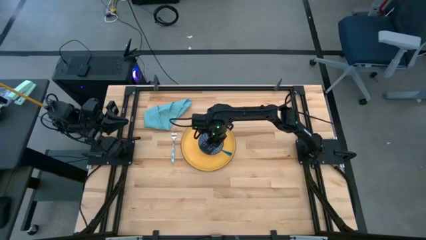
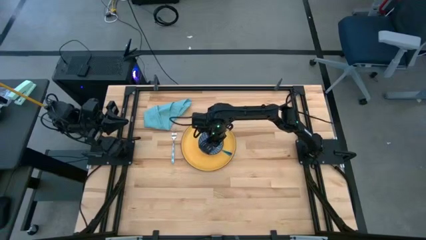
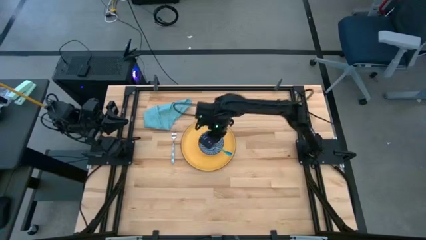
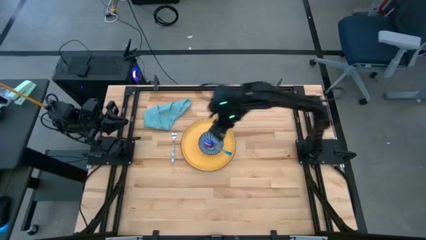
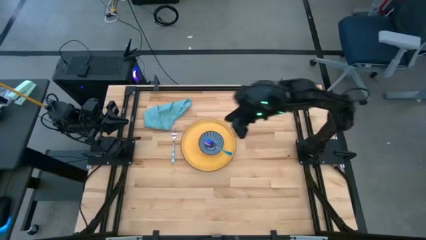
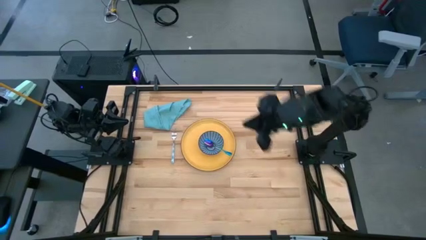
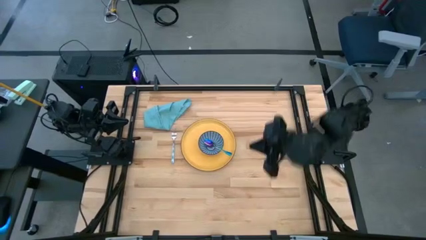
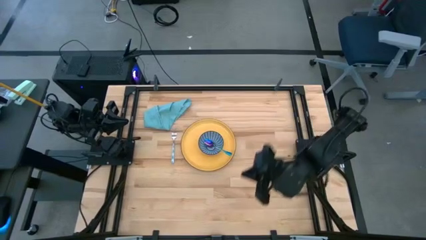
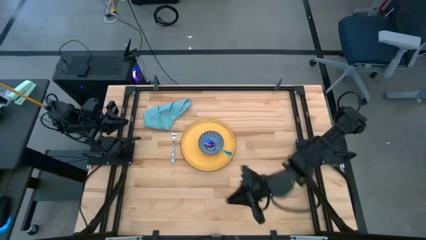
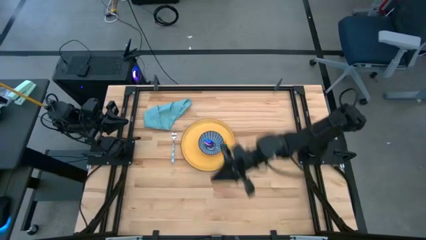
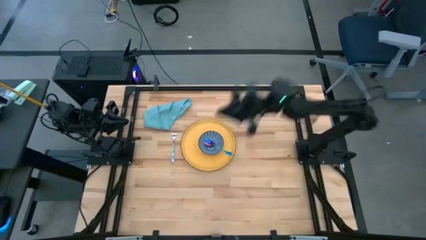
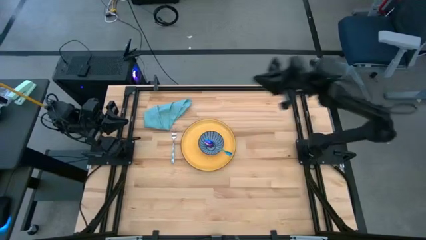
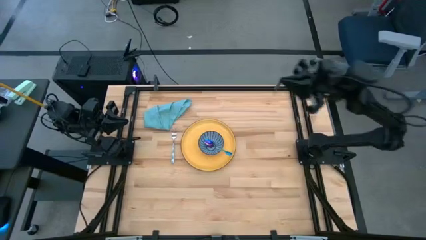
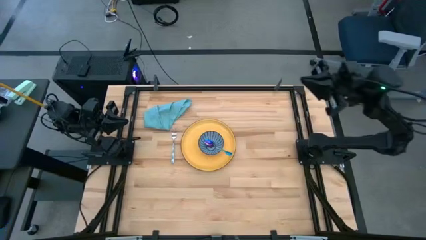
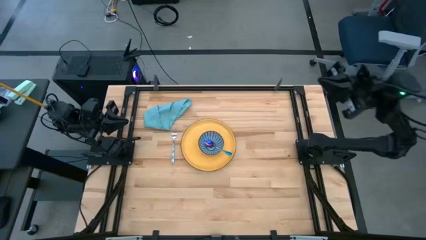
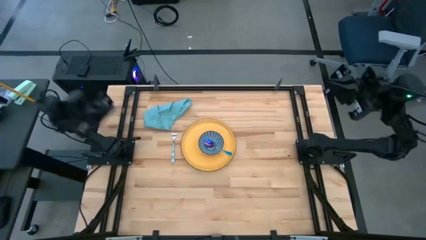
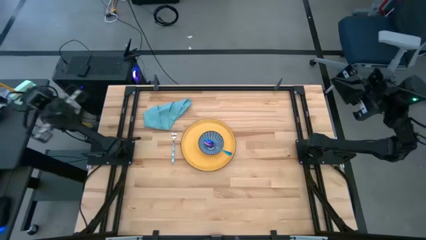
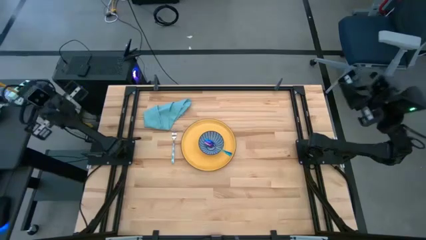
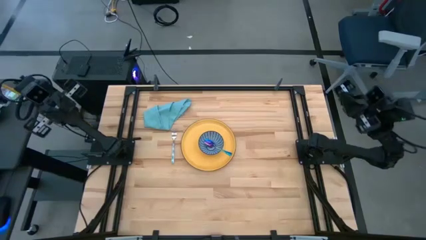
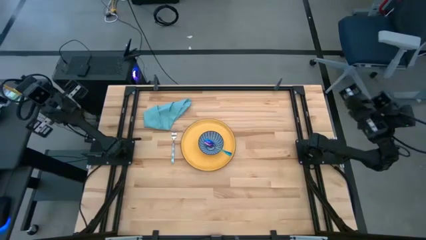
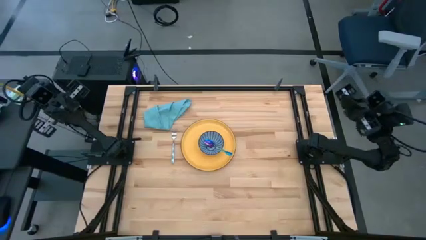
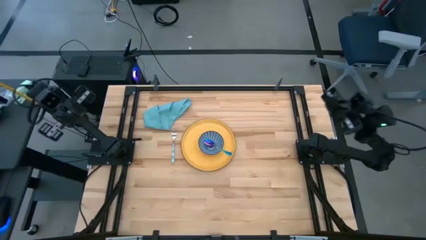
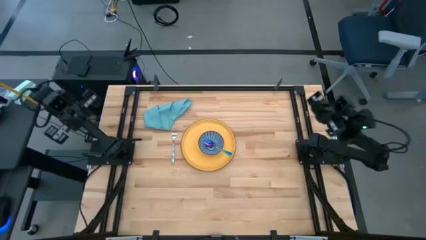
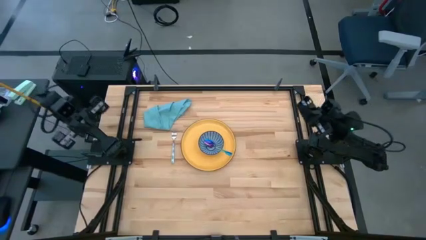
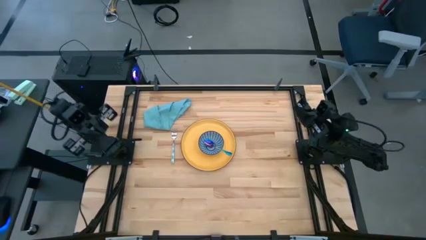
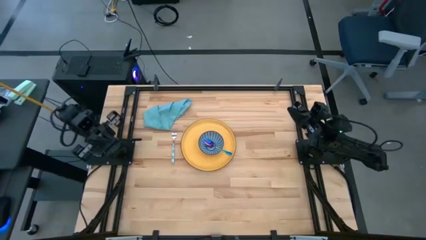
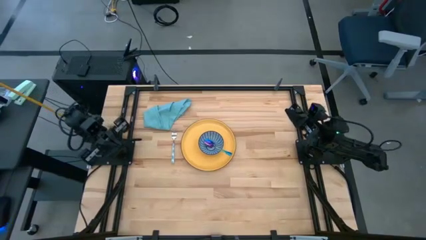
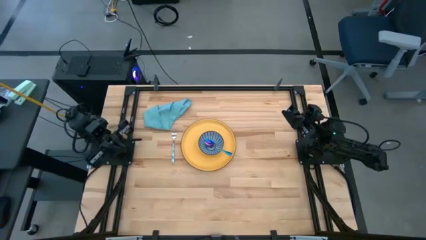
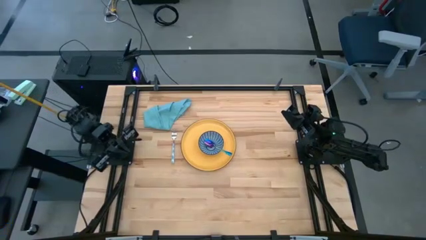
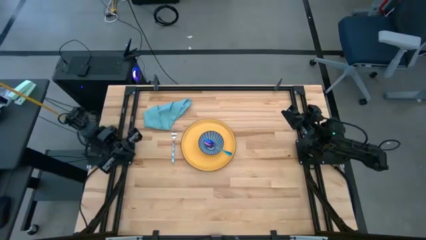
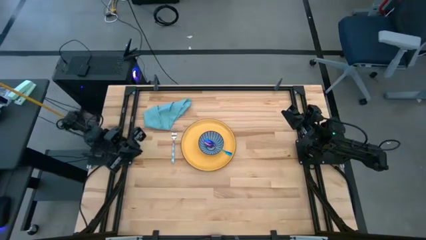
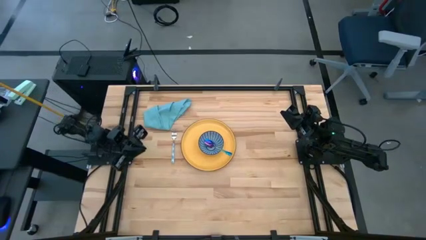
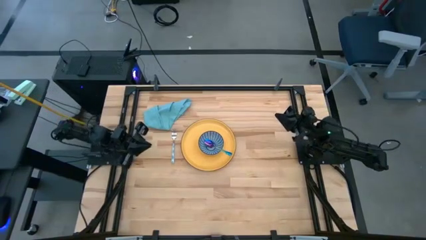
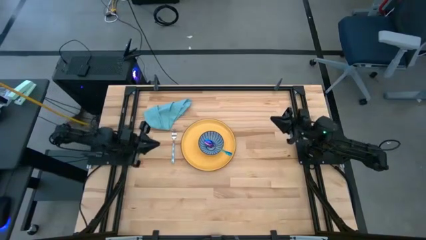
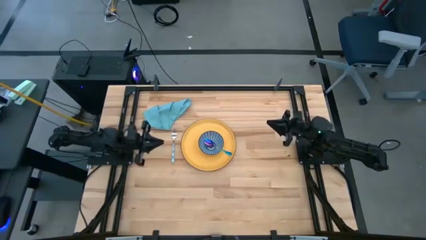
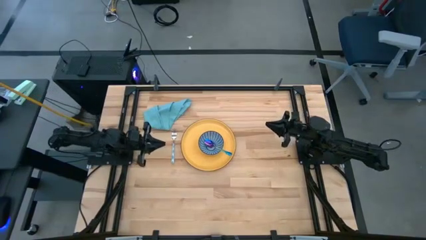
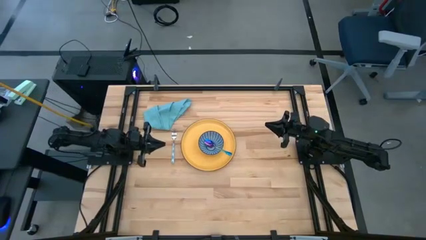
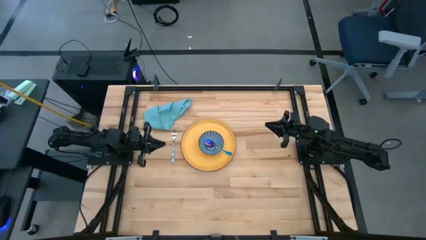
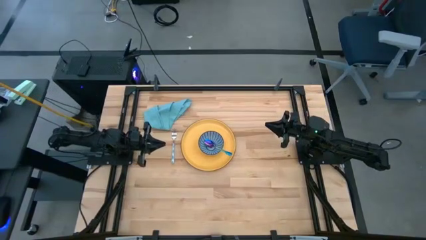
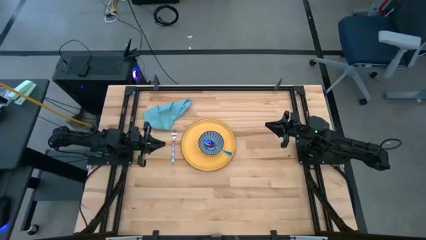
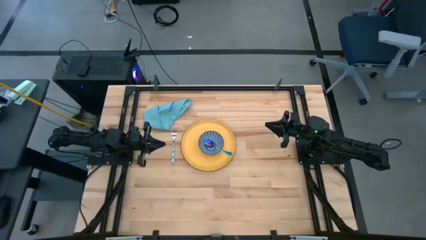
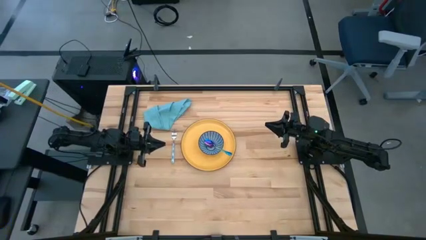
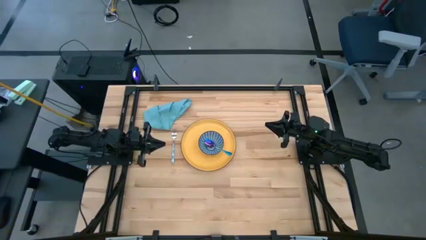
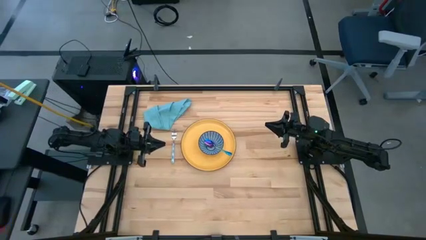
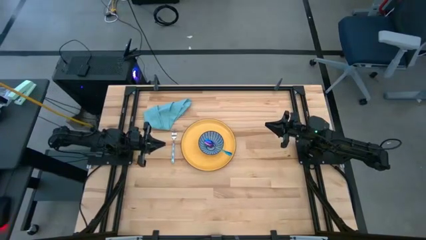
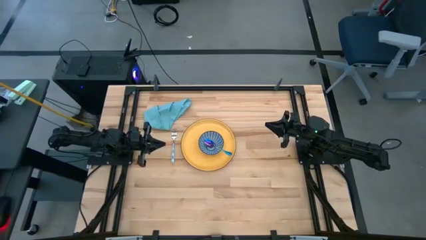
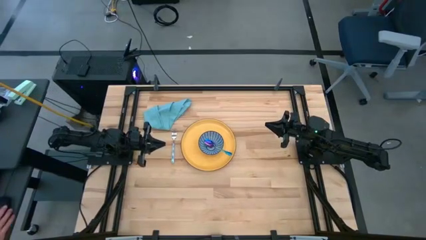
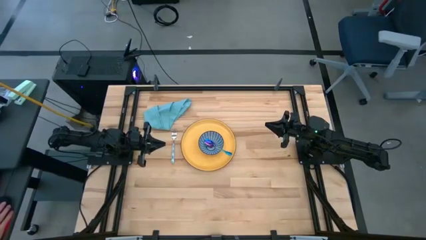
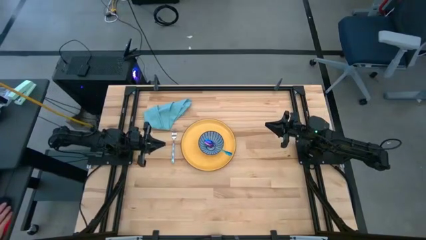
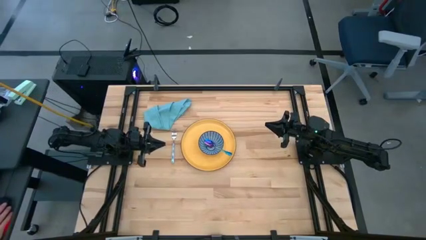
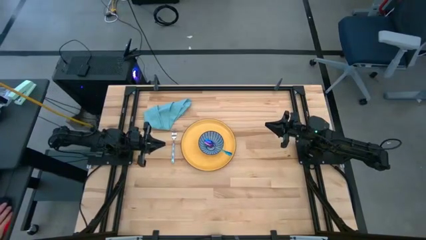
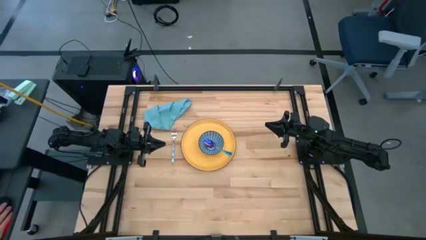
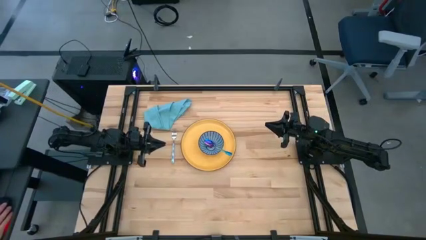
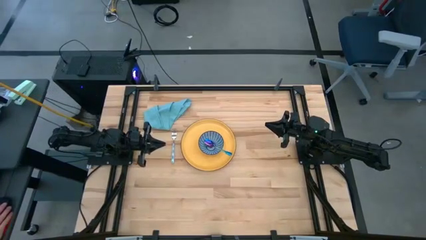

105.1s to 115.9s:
Task: Set table place
Return to Home Position
